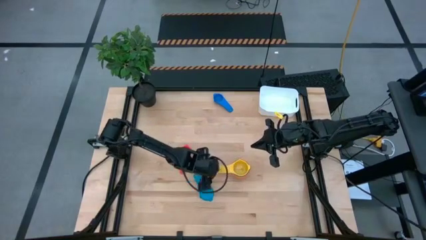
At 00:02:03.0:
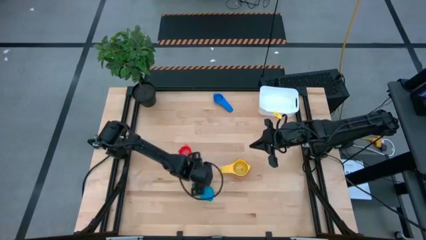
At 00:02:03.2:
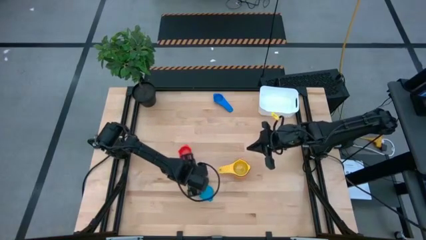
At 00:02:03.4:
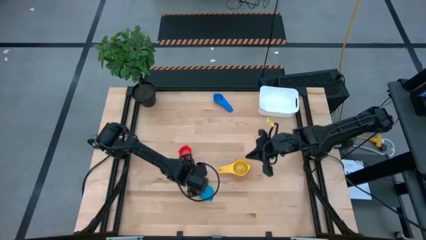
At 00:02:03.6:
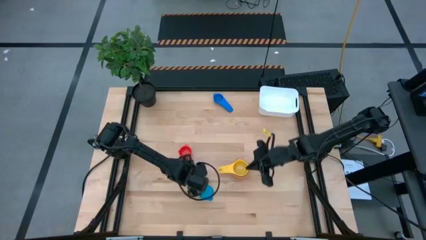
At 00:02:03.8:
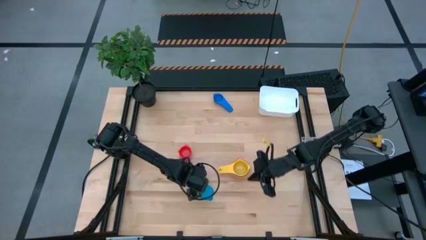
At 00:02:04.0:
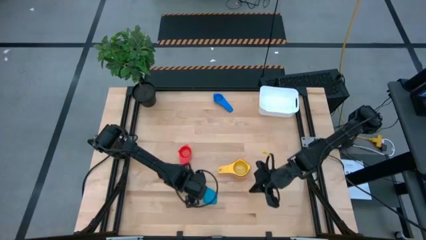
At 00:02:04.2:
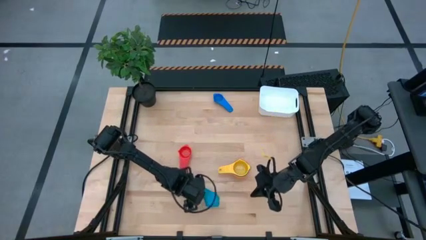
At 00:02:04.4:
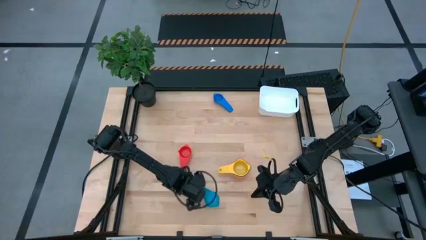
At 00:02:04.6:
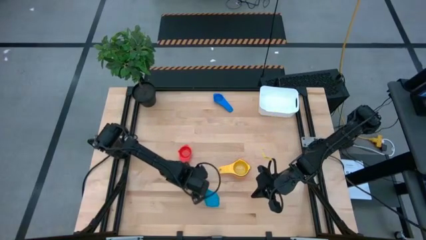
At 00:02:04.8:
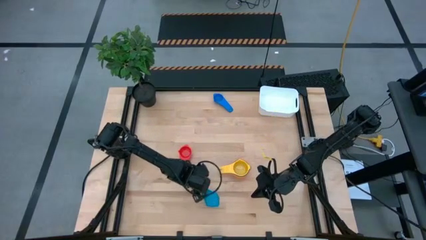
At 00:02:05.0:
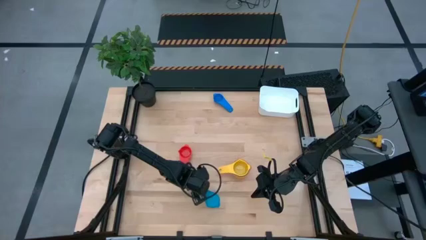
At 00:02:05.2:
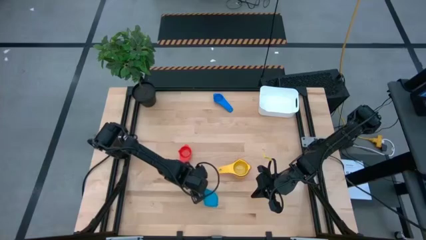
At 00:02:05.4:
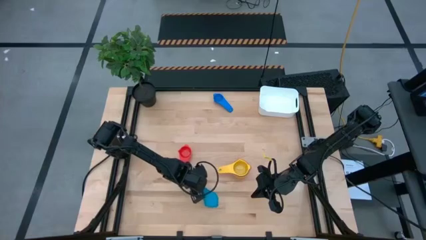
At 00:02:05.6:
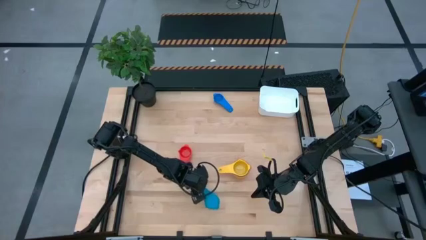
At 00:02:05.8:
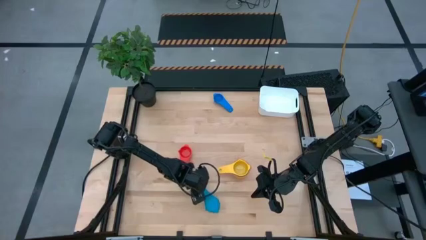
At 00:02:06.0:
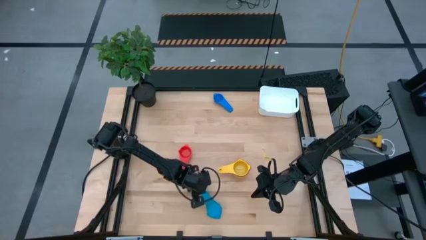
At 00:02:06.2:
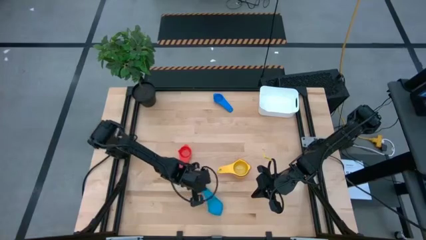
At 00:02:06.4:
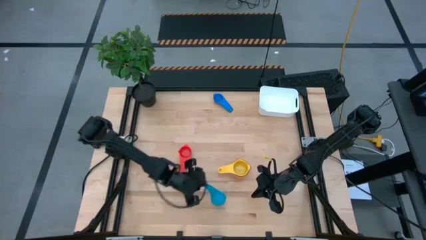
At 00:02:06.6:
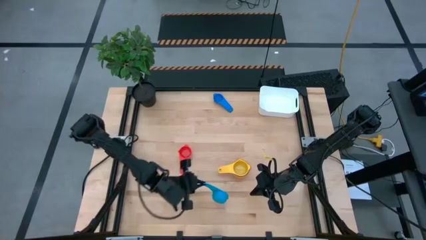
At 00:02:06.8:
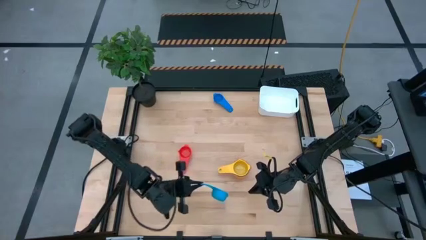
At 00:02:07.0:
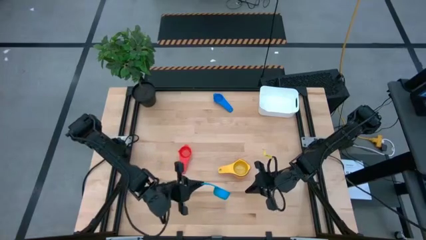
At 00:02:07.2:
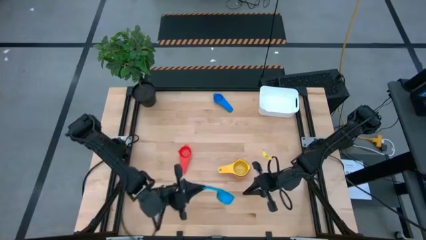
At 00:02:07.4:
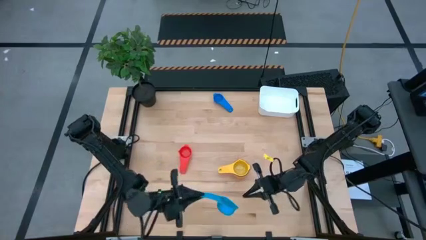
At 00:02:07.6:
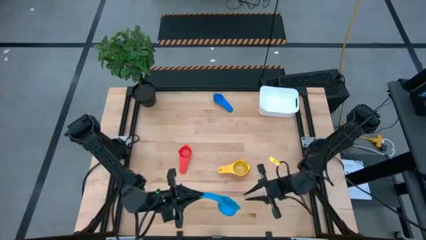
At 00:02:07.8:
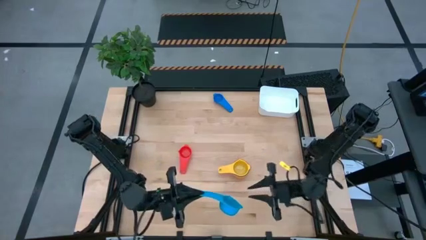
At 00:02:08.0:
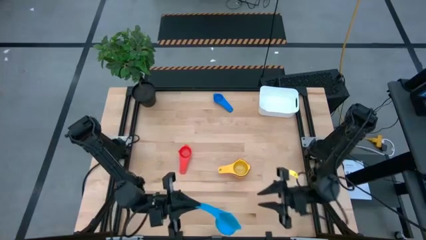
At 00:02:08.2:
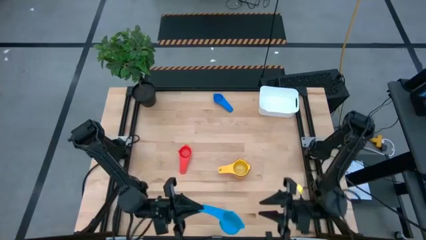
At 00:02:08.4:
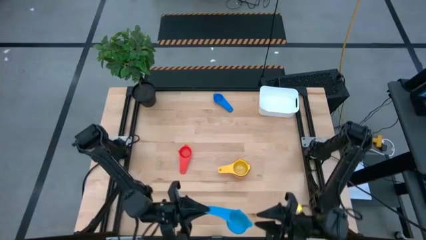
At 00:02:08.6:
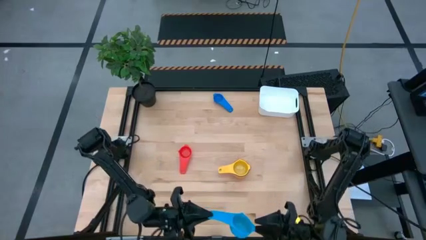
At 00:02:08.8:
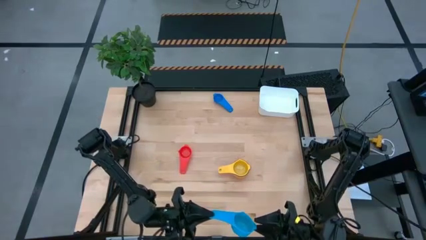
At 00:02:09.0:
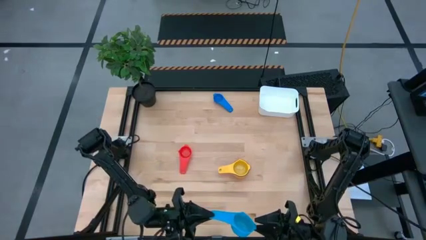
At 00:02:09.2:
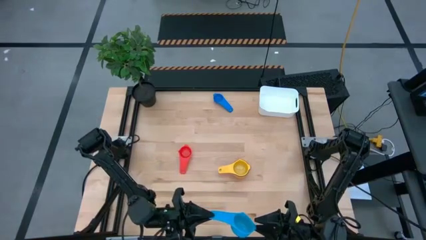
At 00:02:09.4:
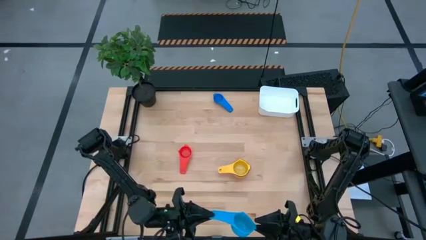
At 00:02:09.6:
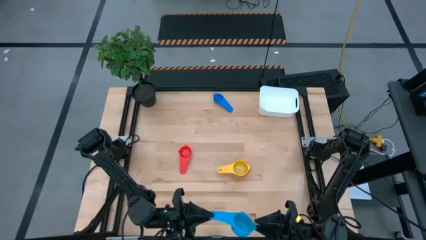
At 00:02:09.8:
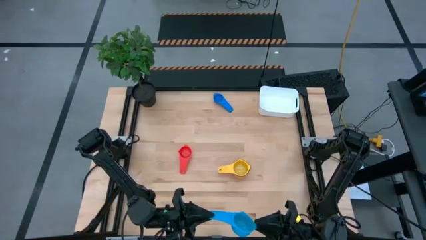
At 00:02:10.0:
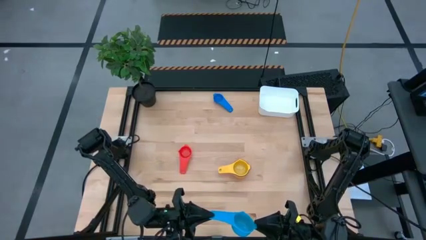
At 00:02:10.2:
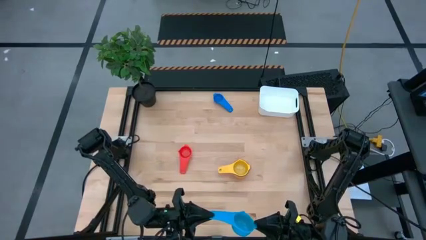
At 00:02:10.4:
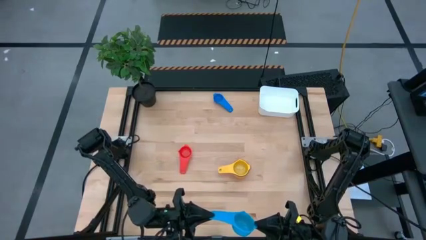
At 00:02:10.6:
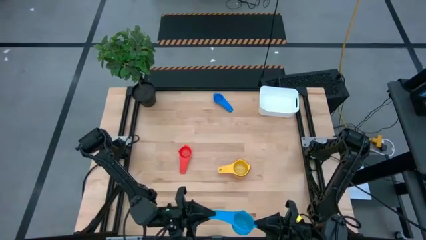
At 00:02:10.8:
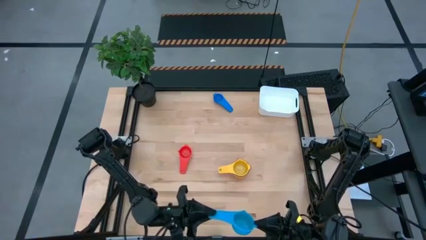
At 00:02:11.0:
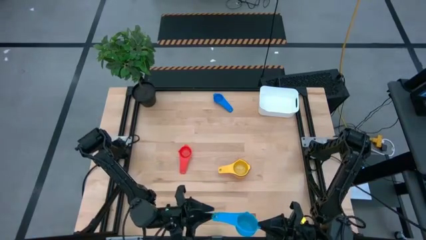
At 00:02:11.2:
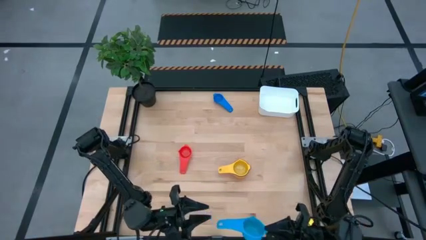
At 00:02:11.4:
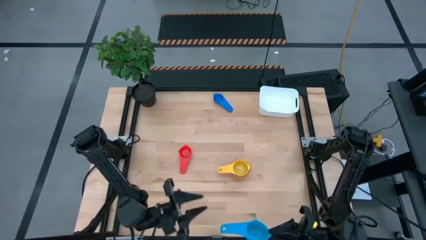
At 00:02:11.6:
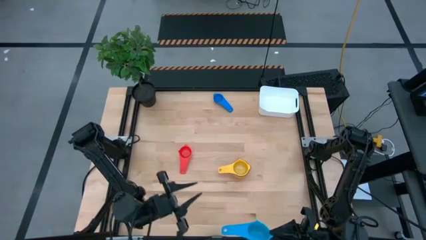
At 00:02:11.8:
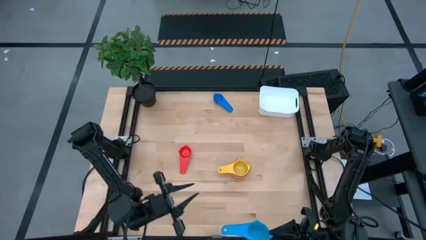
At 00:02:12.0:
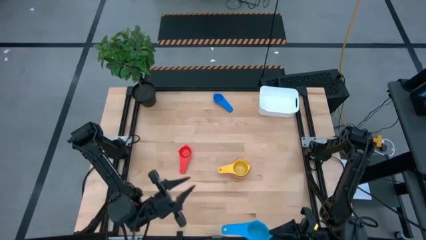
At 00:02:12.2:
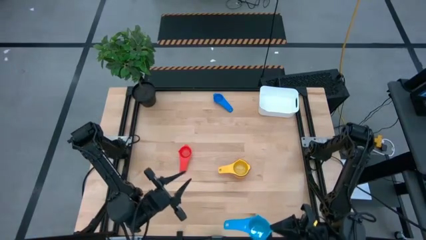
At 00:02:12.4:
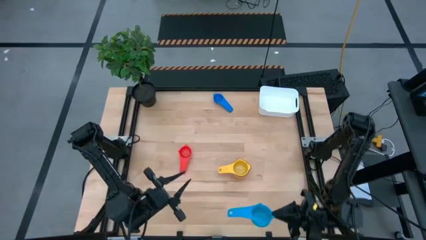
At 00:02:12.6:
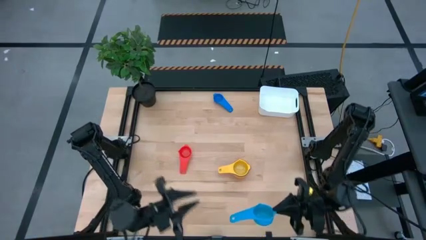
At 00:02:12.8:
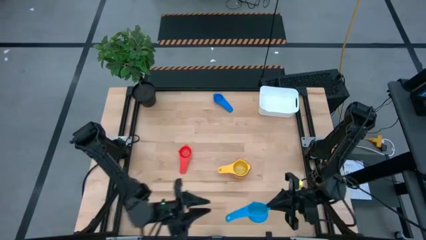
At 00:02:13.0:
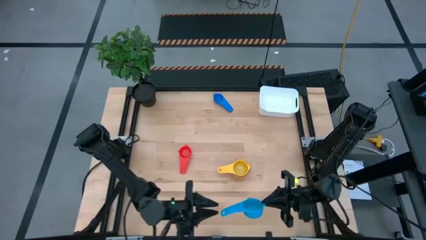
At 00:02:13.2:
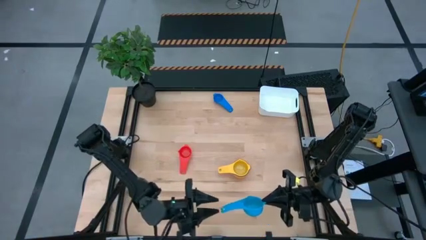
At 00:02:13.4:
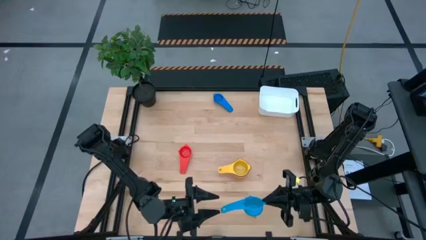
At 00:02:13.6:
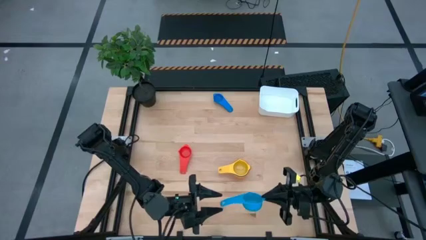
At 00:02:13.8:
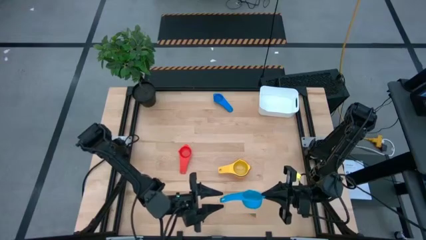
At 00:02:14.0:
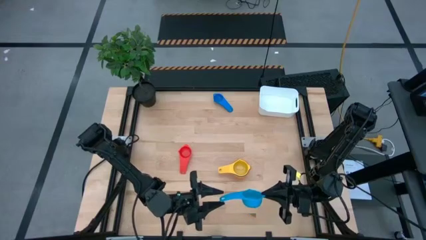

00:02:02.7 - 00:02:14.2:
Task: Nest measuring cups in basket
Stack the light blue measuring on top of the yellow measuring cup

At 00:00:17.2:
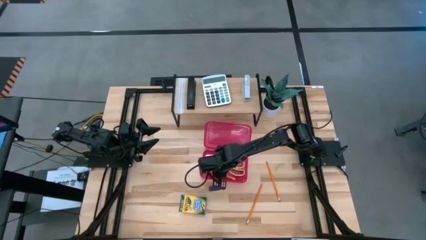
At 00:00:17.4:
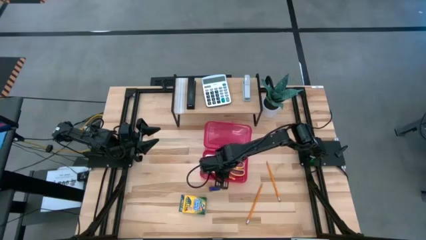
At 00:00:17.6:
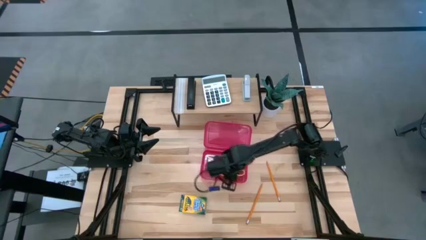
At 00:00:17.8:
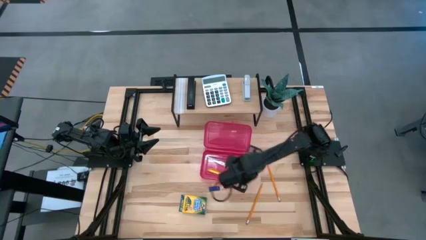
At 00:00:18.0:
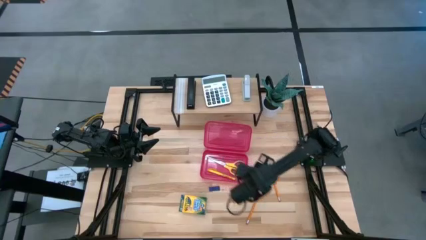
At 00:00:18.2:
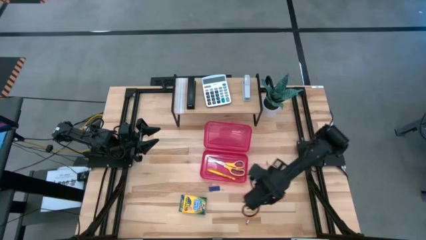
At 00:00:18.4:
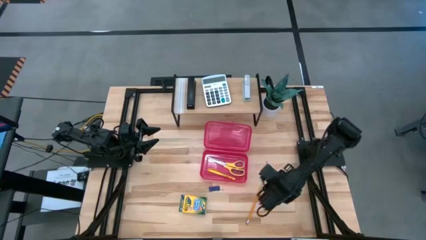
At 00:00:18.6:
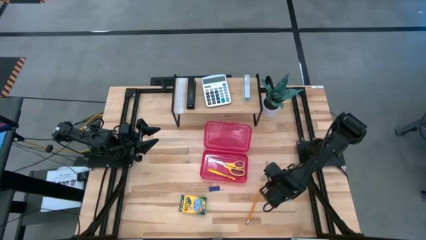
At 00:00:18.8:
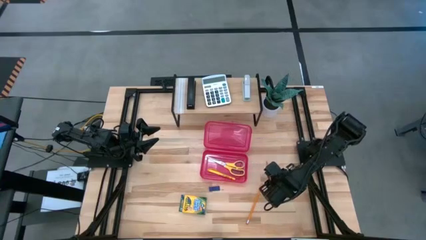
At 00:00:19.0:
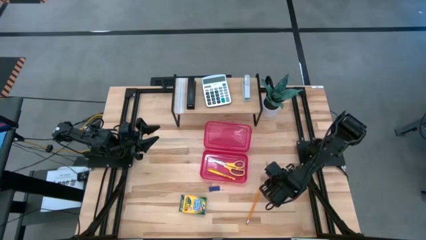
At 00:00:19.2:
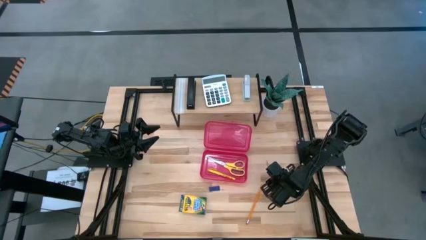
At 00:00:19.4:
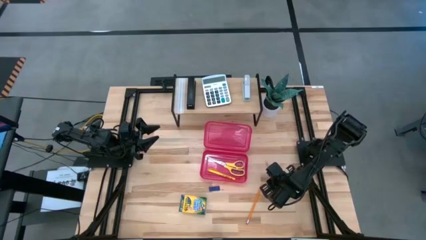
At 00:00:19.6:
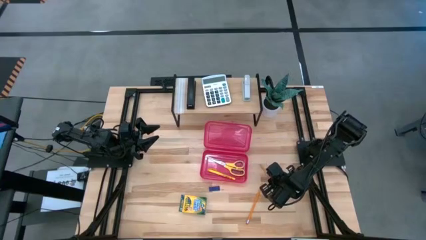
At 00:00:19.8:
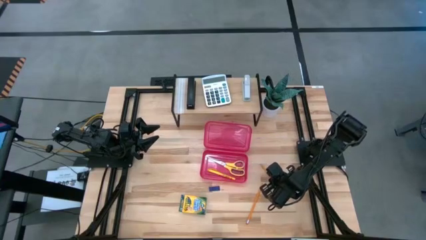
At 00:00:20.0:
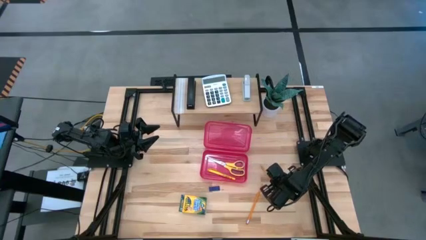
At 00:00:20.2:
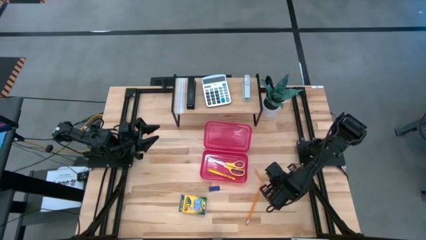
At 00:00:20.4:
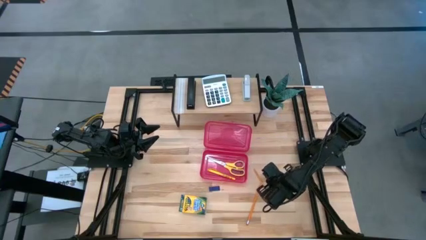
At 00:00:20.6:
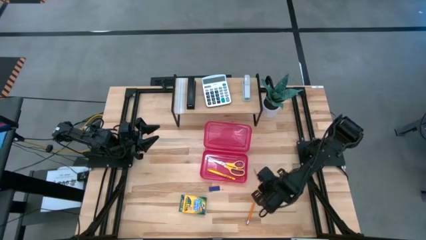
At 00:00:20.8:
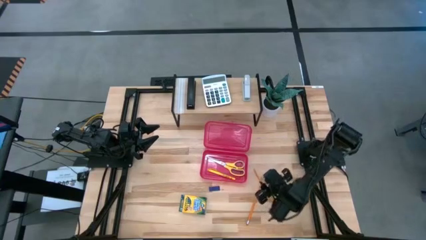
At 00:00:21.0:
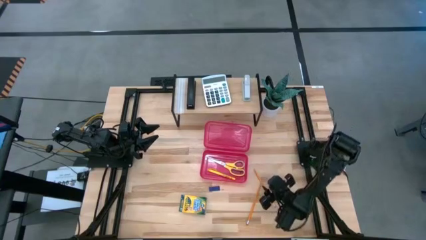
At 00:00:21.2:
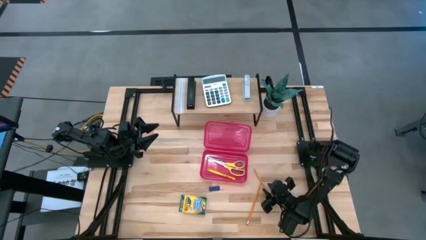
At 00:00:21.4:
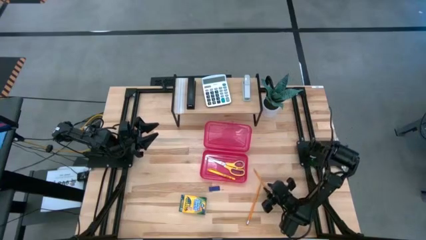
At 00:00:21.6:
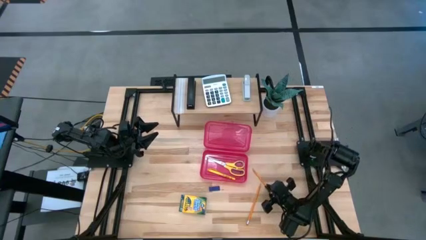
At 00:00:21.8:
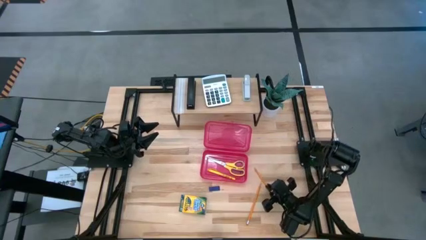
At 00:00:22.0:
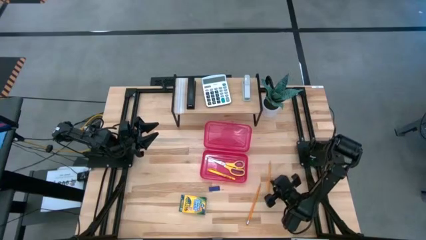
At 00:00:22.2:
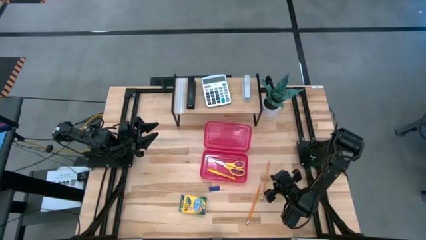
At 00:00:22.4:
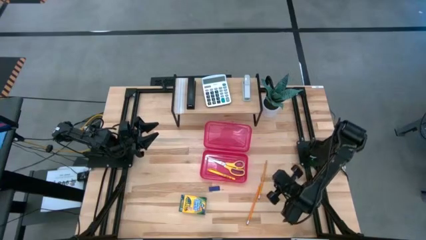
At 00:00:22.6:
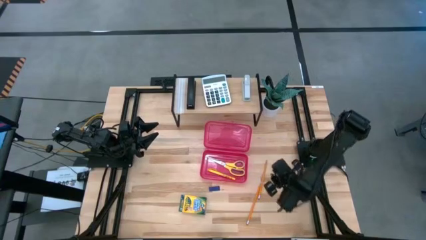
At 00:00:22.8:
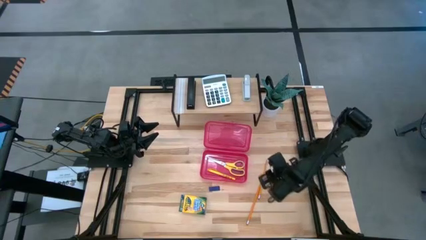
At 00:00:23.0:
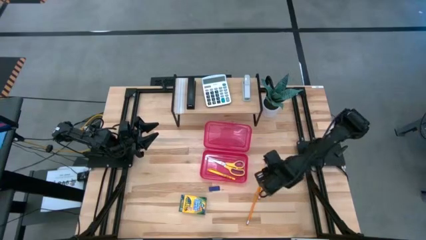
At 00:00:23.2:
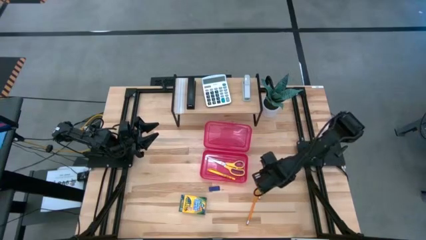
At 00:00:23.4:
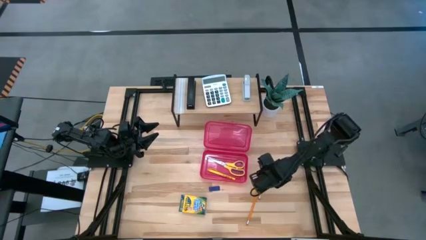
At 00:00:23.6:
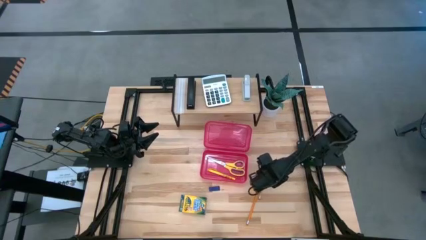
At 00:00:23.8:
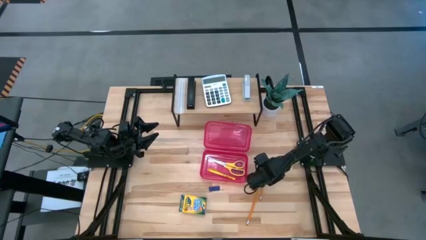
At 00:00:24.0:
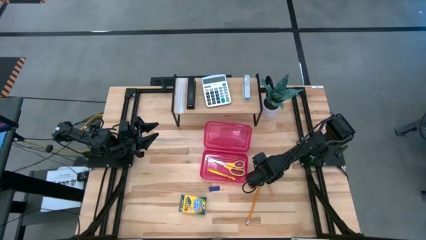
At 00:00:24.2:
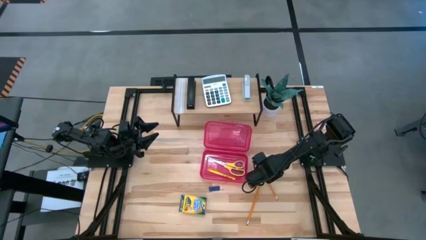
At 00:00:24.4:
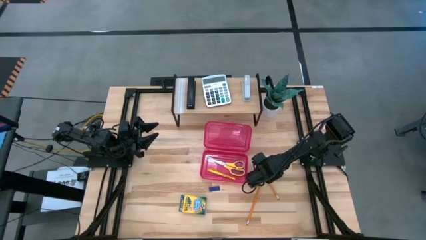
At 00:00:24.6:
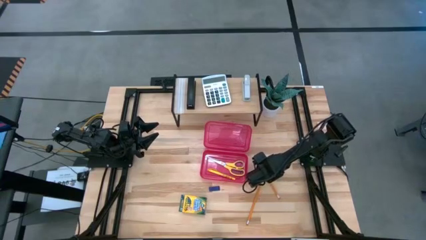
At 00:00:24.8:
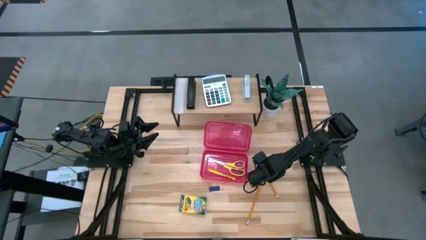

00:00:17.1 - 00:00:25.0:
Task: Pack school essentials
Put the top orange pencil into the red supply box
